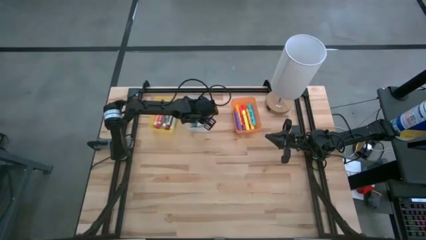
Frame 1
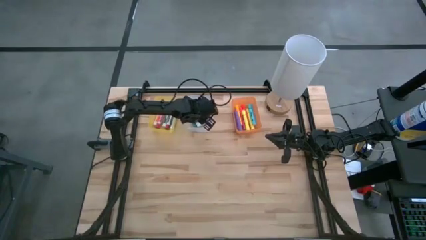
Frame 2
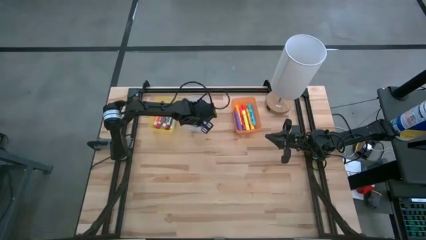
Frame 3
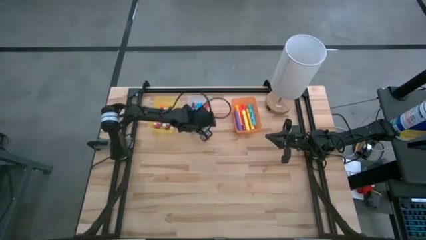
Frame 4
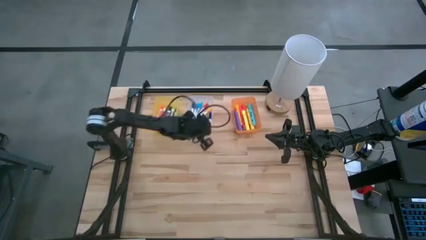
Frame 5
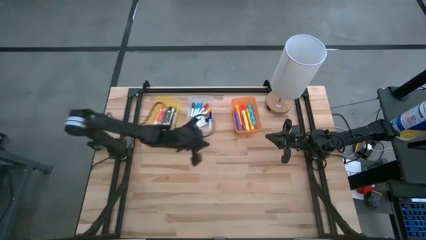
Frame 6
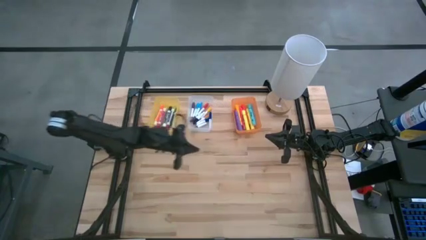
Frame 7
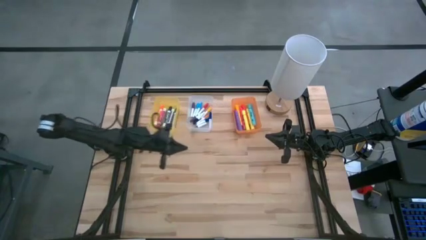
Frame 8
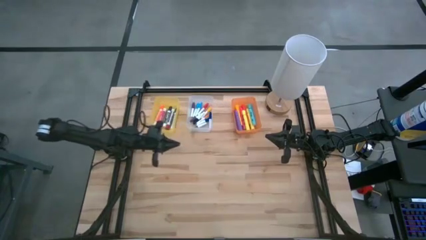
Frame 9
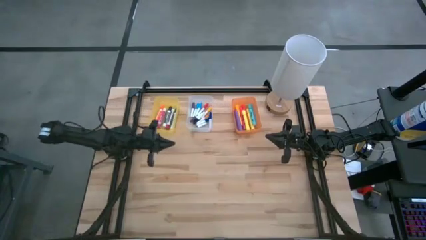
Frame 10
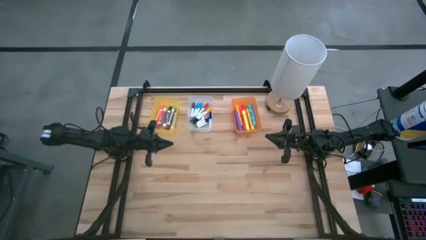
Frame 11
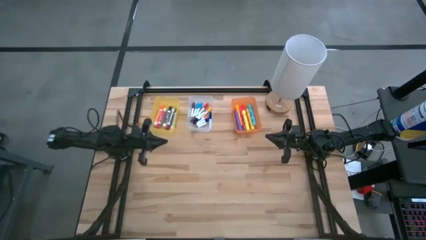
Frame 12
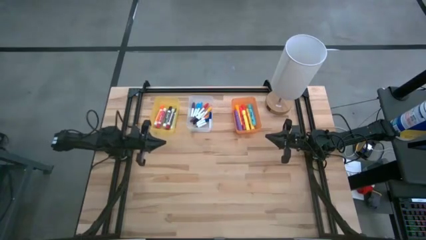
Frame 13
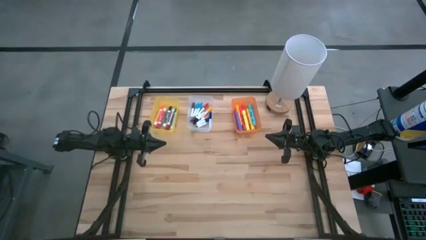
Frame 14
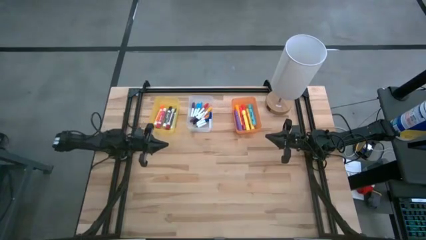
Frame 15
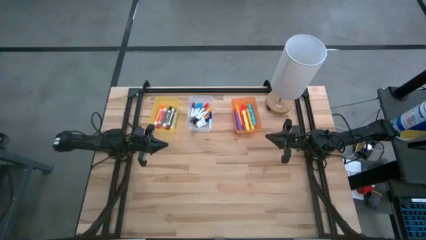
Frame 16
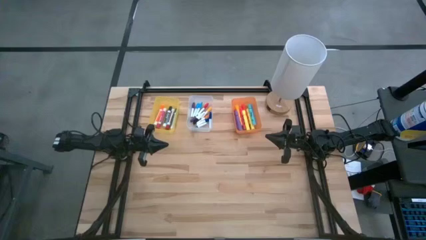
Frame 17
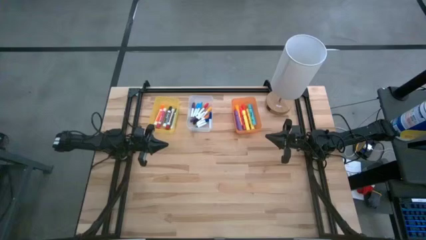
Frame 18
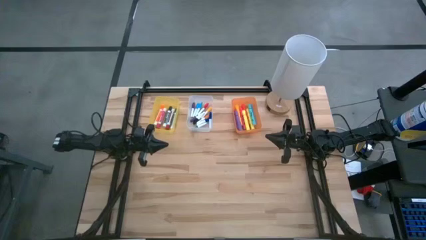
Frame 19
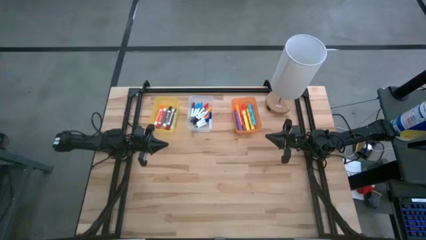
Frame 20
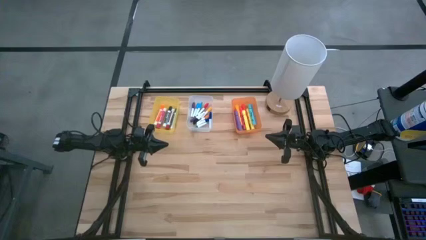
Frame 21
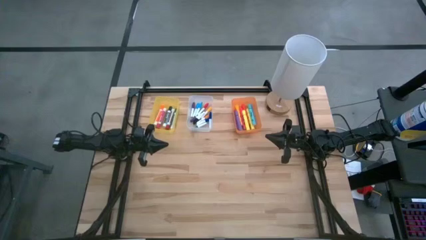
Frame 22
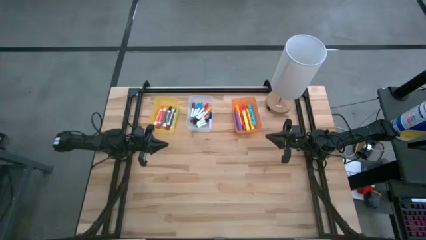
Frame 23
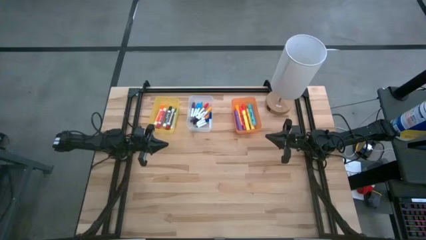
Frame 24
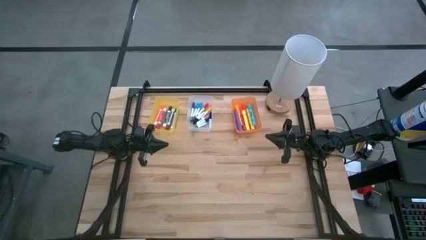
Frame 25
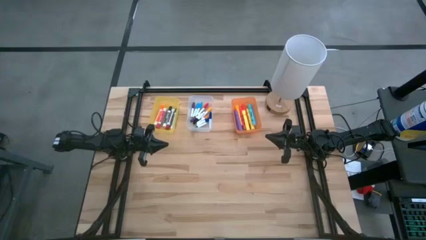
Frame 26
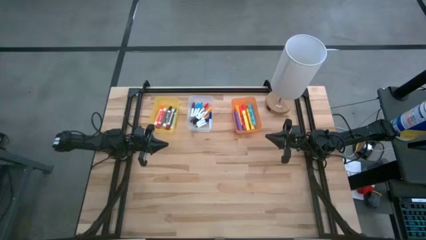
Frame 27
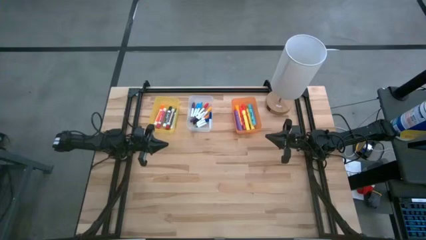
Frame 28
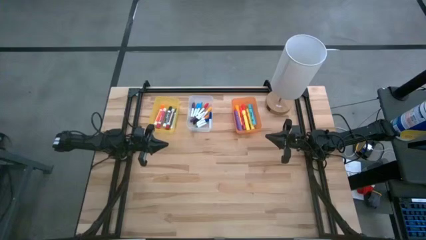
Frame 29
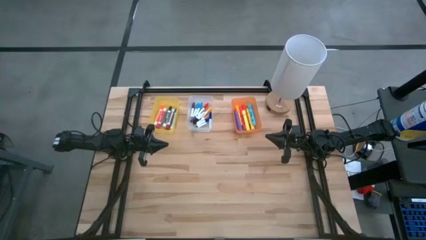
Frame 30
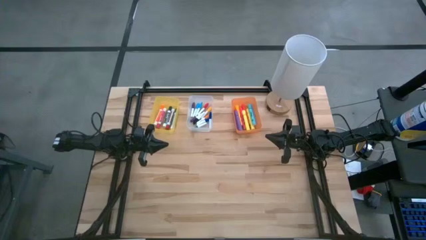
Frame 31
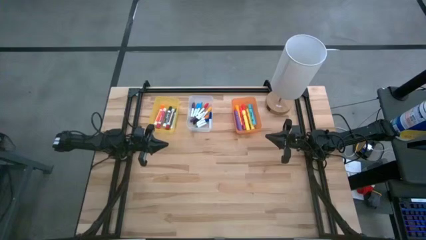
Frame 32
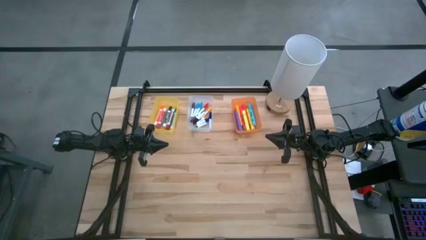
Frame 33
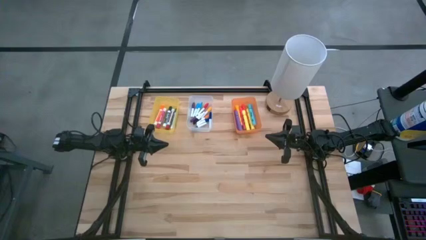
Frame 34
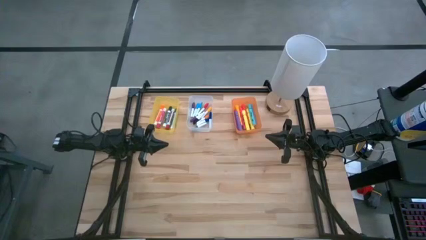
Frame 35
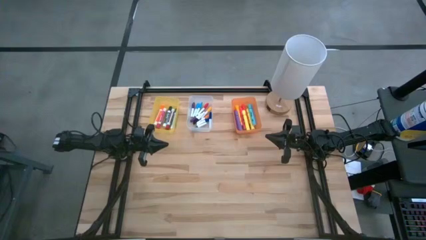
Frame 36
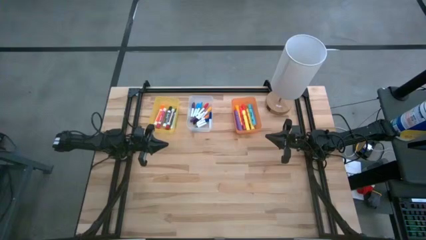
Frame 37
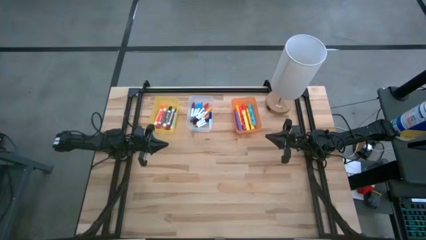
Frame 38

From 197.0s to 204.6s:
Task: Pick & Place Markers
Return to Home Position

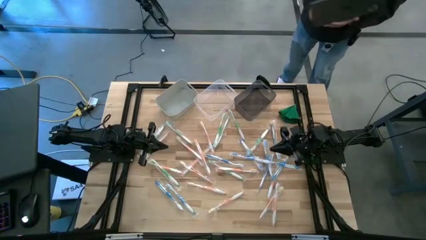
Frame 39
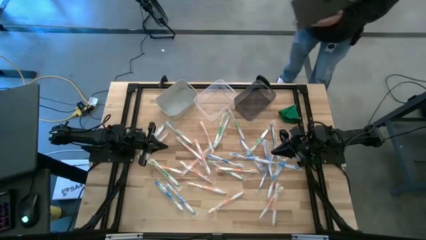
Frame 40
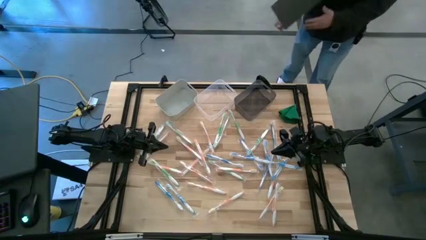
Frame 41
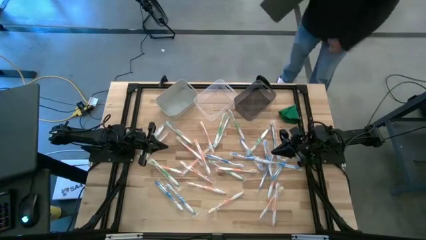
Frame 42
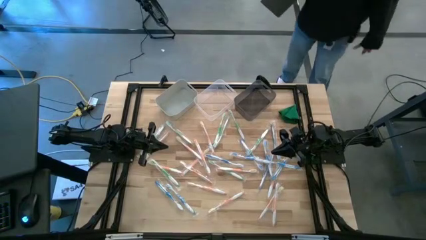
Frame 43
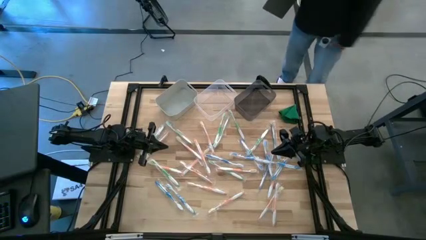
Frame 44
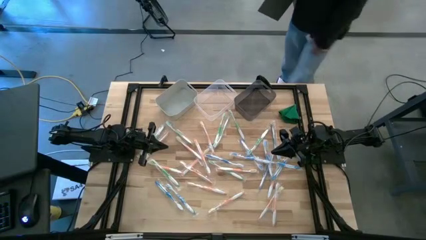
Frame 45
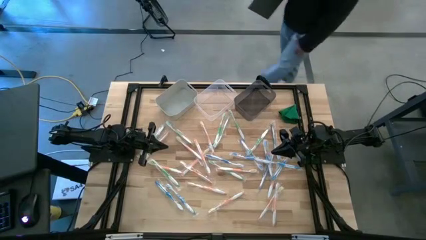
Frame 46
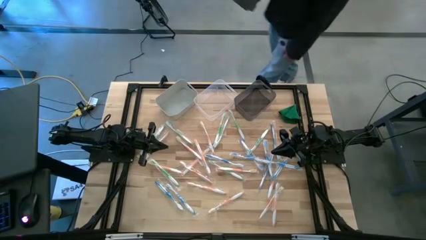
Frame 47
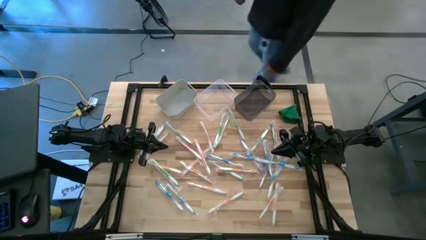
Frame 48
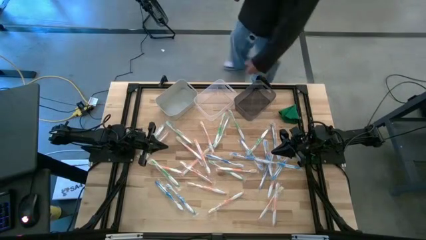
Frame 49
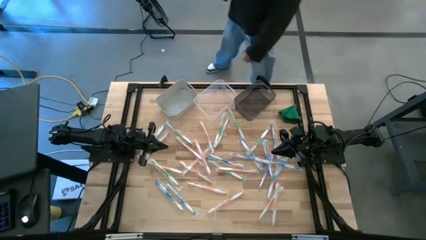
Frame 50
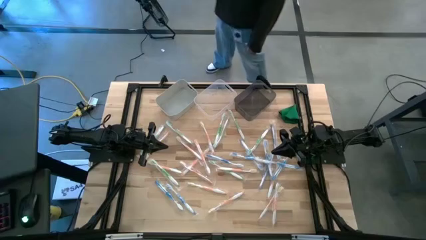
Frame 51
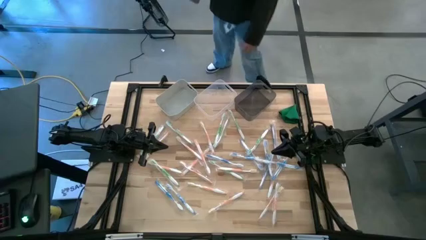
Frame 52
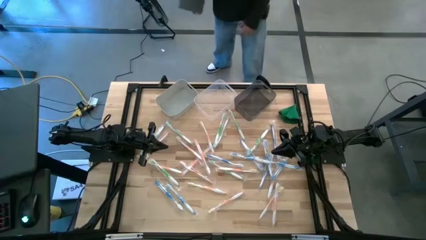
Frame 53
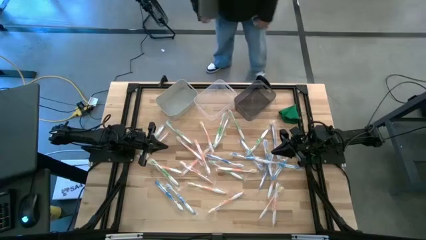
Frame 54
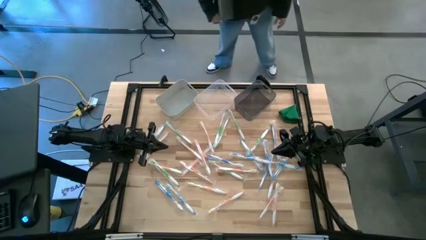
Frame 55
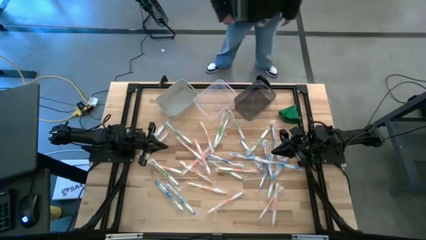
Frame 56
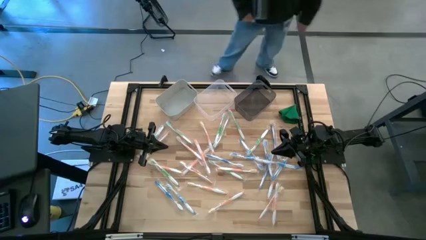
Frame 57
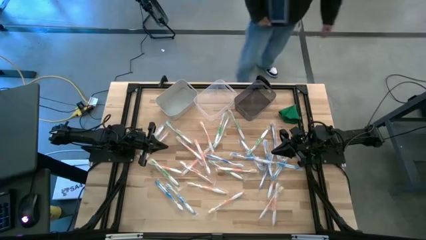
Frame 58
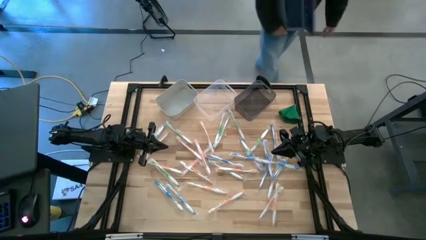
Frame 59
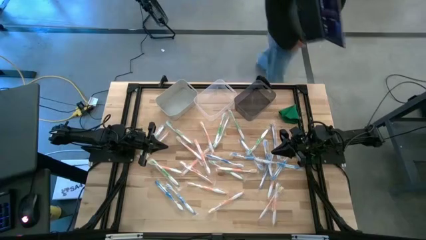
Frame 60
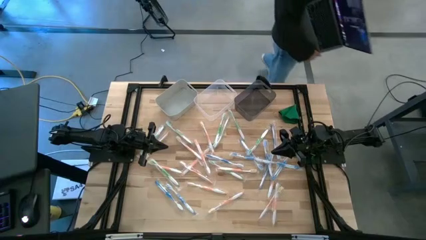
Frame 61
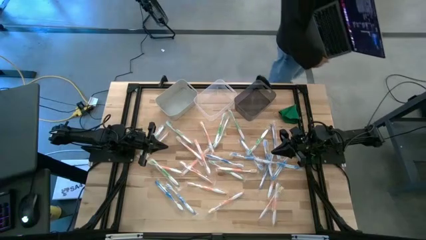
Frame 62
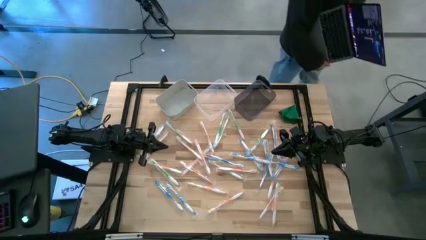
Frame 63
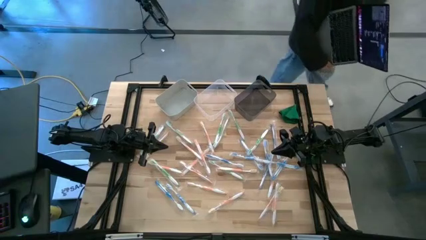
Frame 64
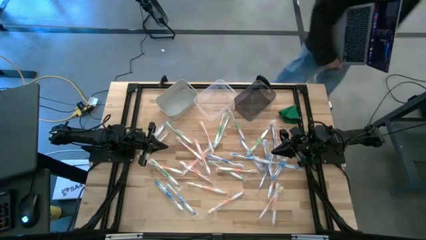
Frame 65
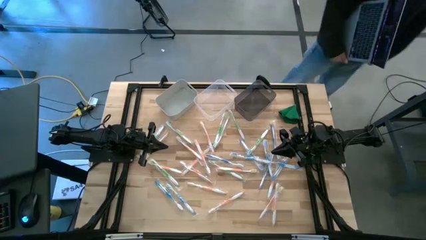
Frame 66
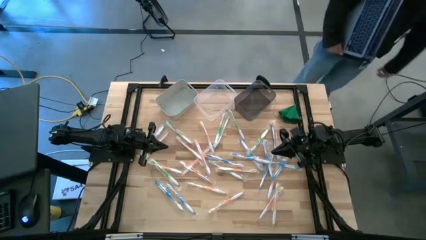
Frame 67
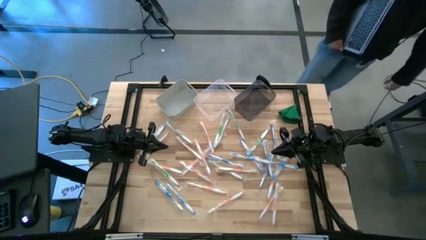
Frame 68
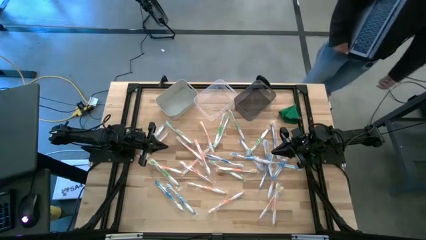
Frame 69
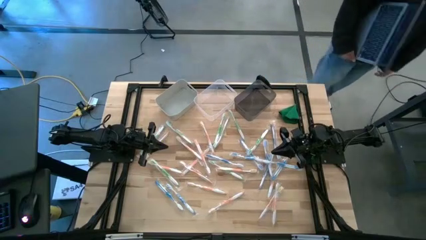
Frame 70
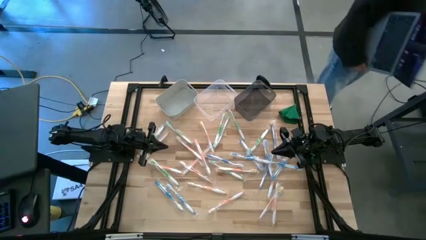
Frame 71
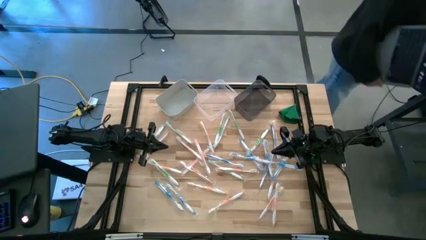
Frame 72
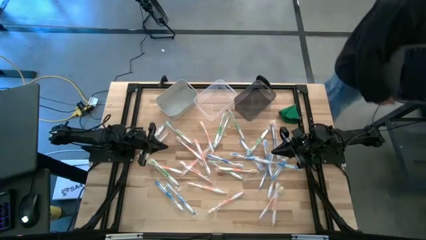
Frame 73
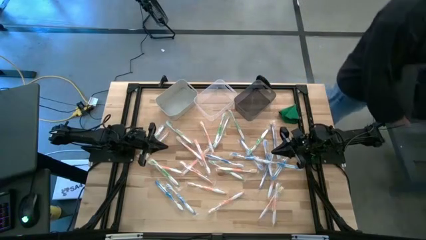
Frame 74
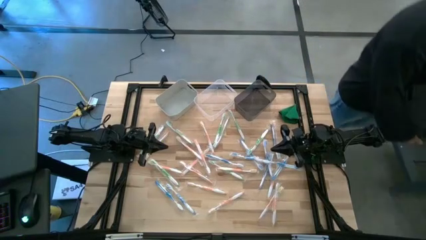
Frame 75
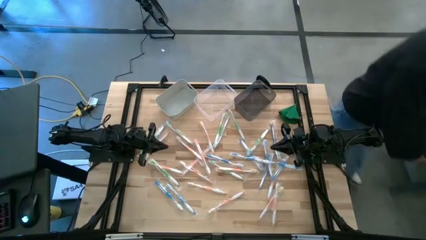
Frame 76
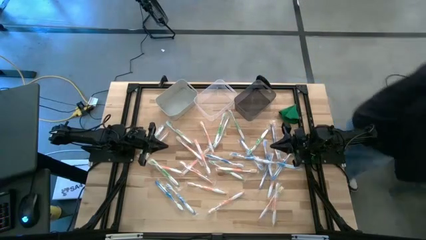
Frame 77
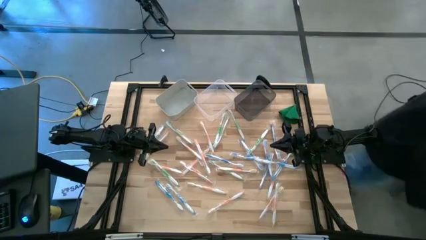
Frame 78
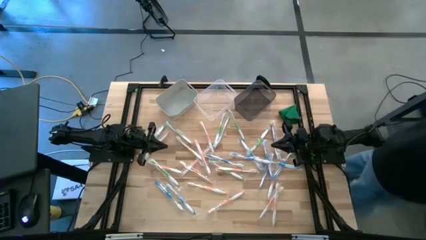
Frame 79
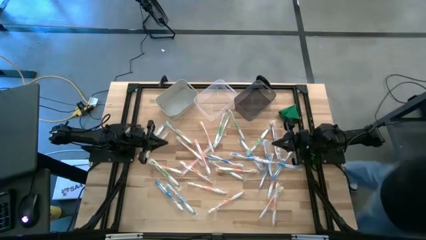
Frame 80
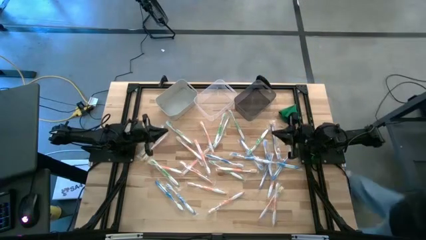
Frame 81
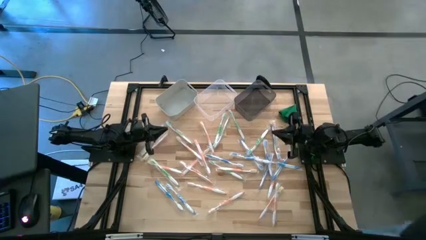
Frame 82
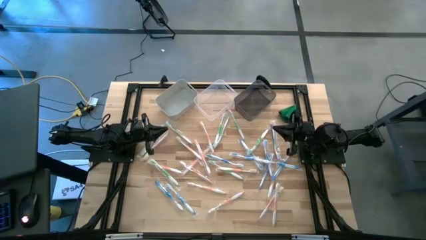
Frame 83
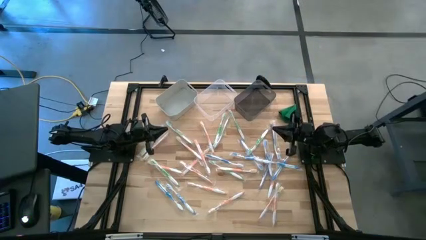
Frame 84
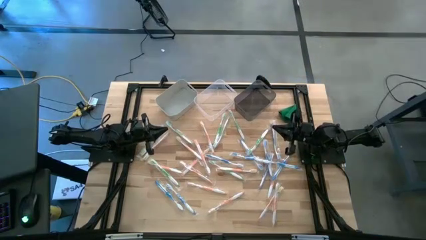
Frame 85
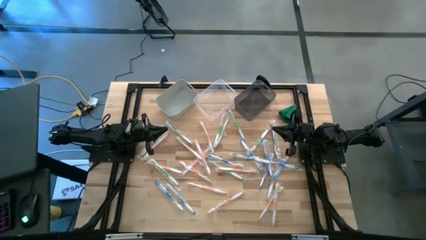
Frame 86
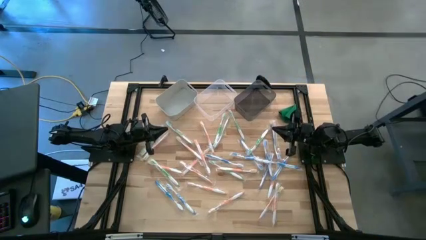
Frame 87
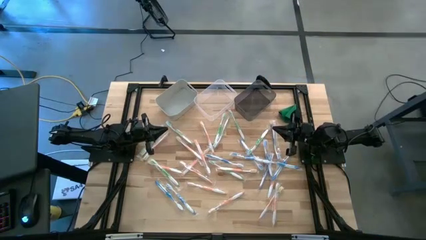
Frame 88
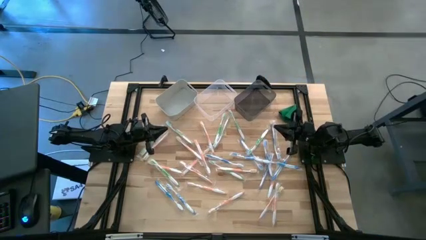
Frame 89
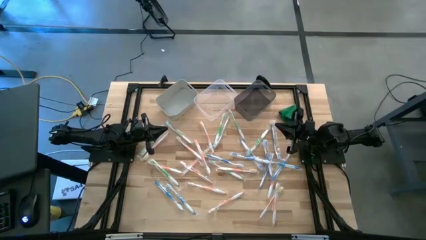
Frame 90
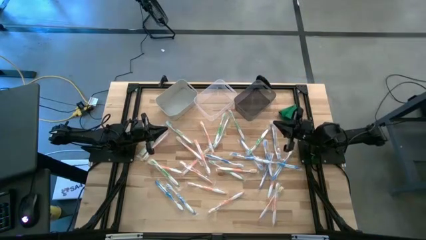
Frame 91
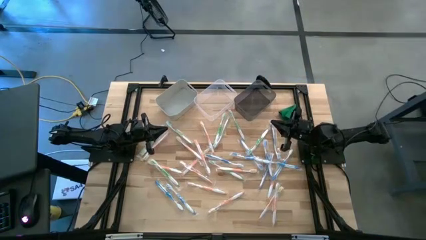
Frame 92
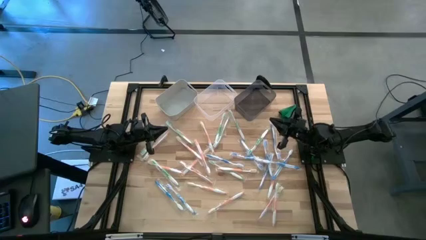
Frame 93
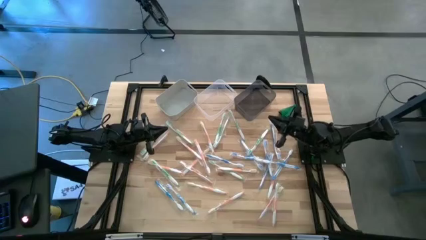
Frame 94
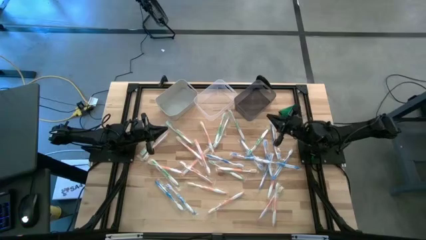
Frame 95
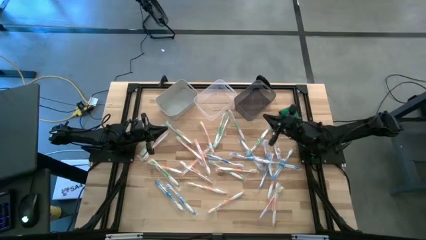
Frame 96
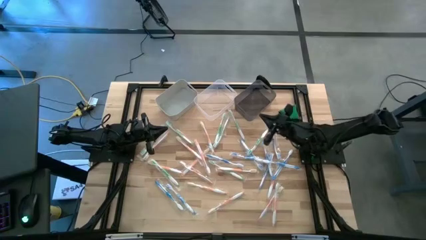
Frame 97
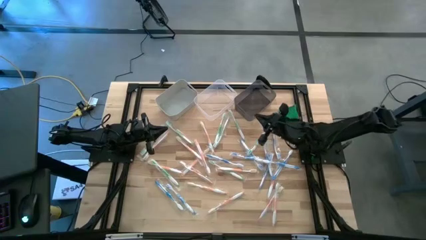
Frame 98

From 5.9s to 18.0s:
Task: Pick & Place Toothbrushes
Put the green toothbrush into the black bin
